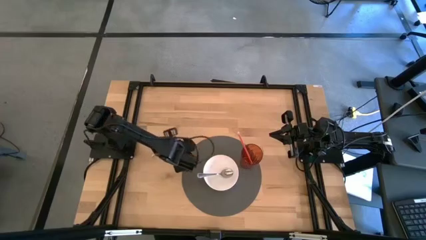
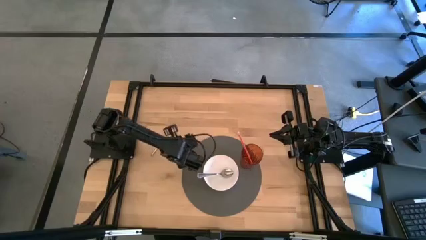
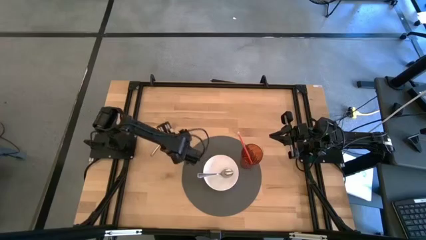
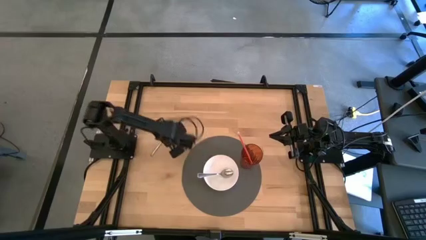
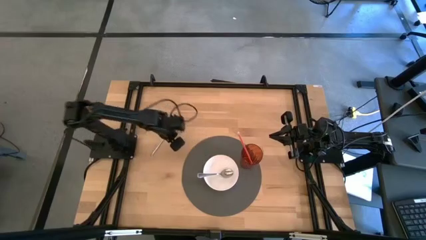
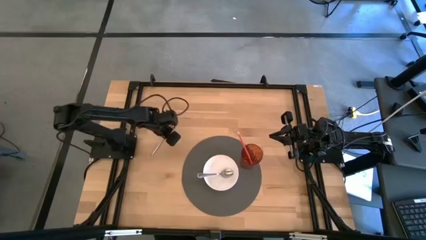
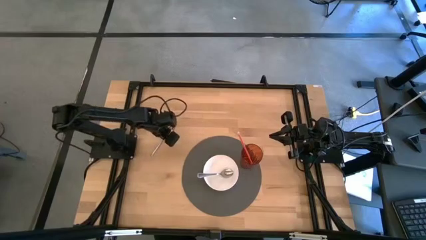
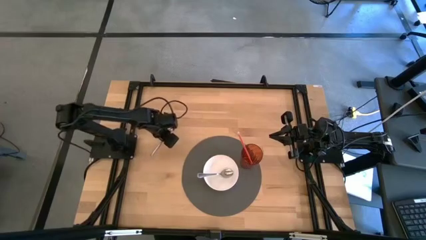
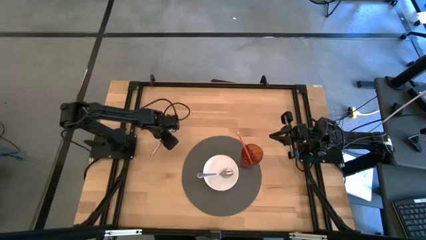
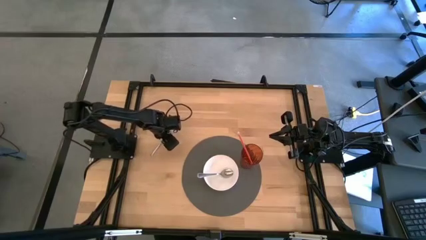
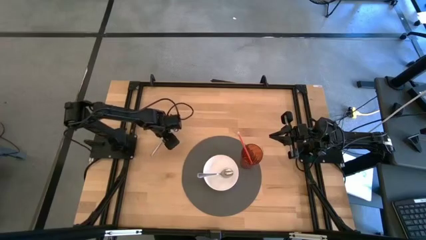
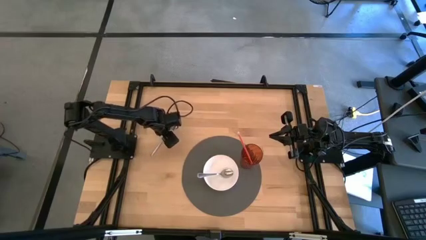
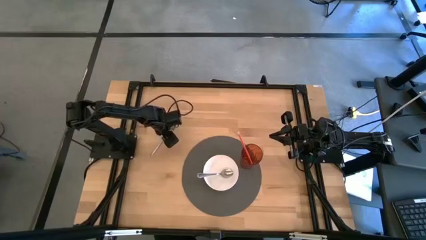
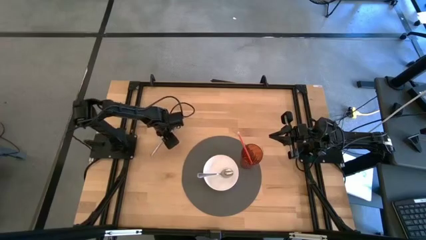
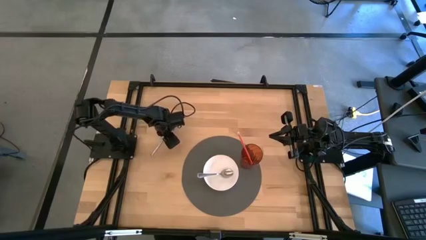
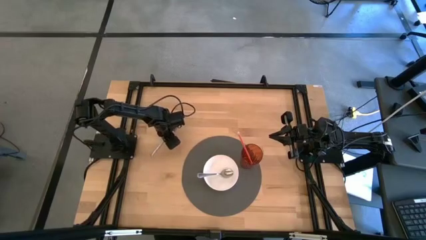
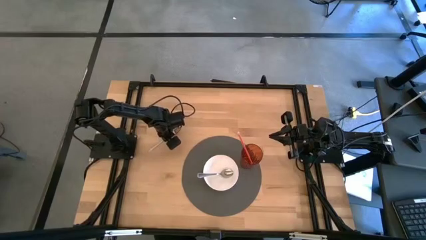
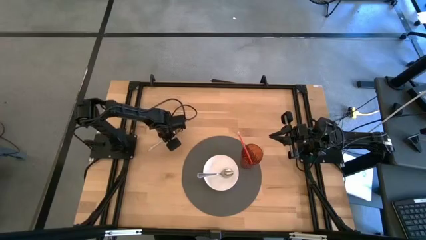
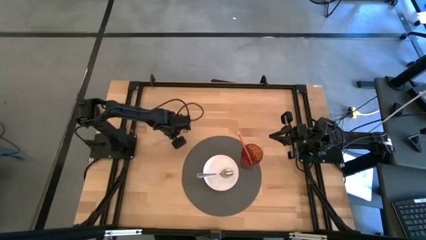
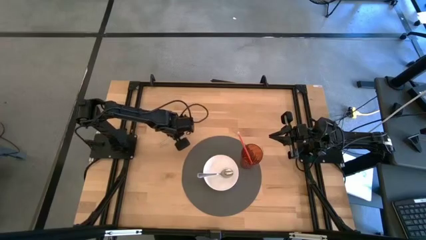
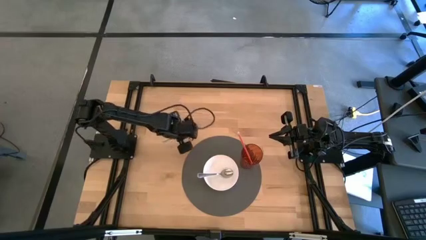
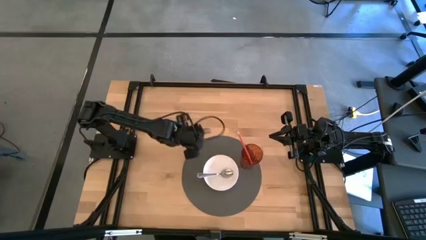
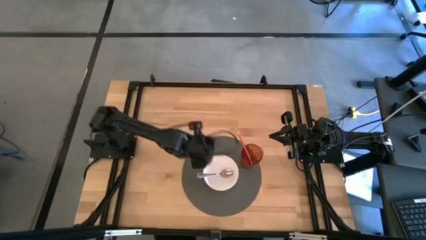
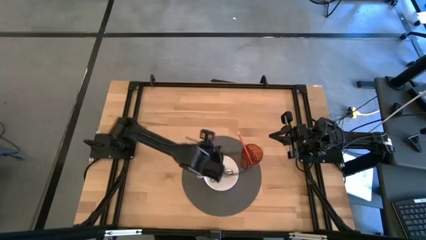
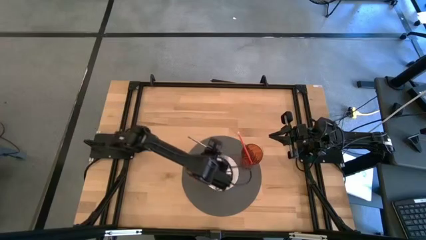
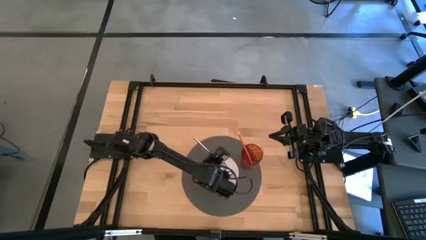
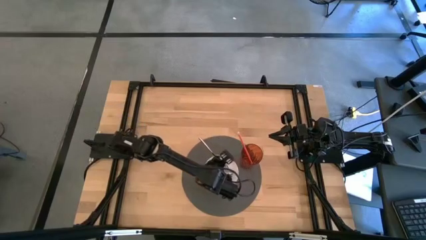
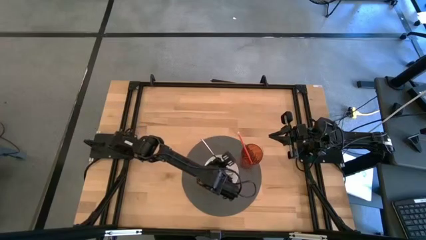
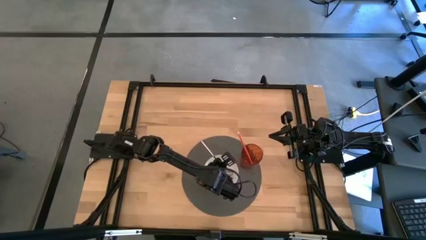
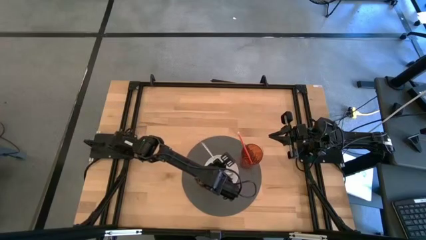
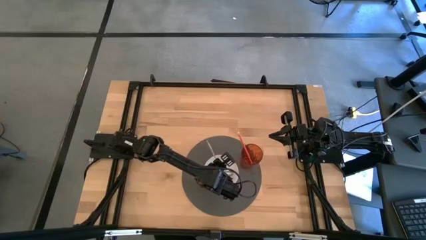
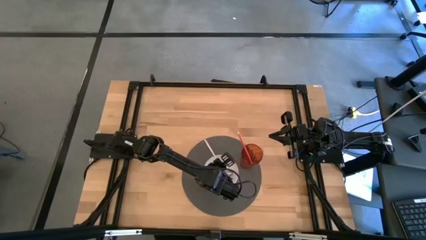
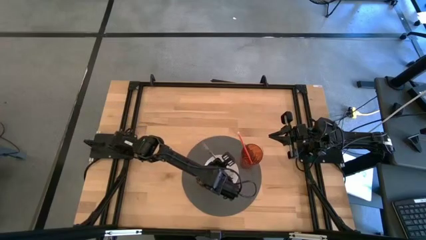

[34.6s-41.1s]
Task: Pick & Place Utensil
Put the silver fork into the white bowl

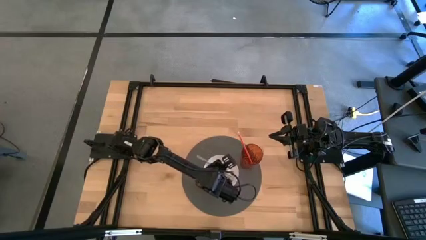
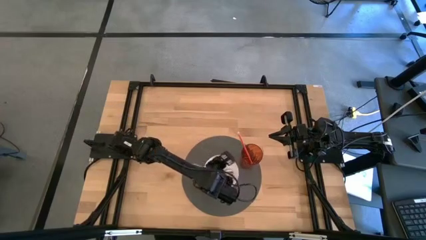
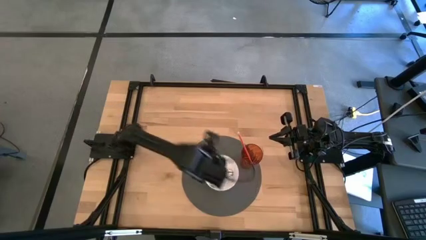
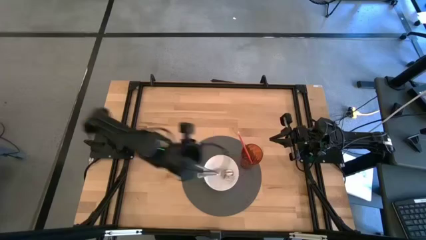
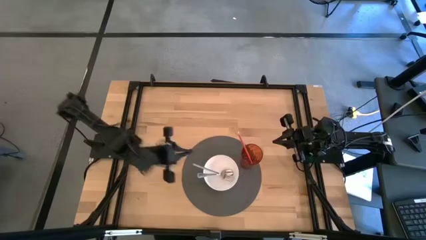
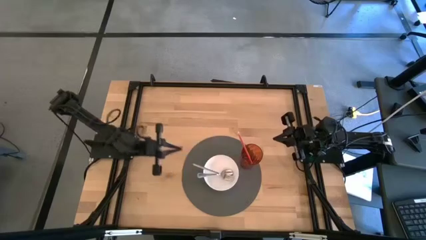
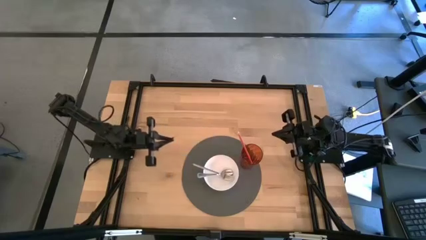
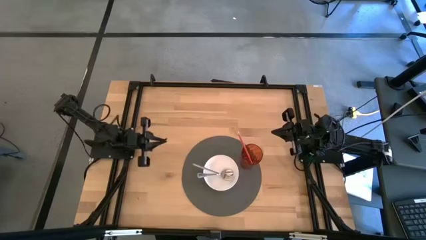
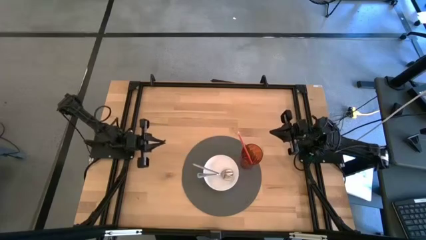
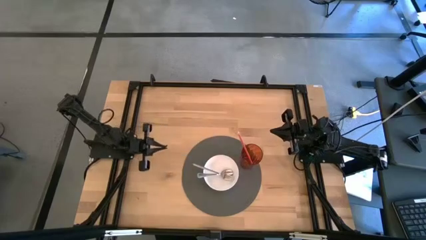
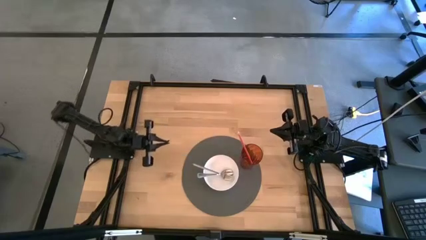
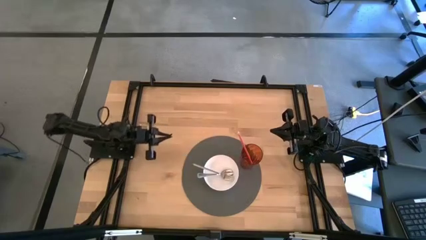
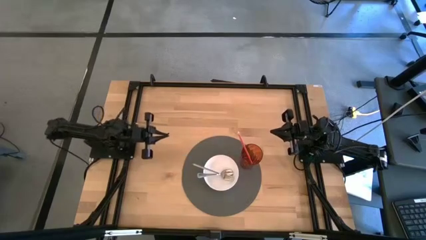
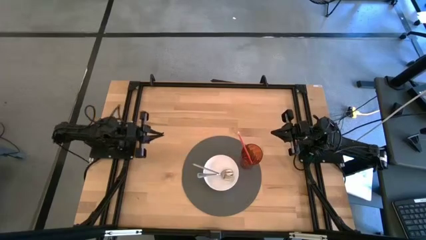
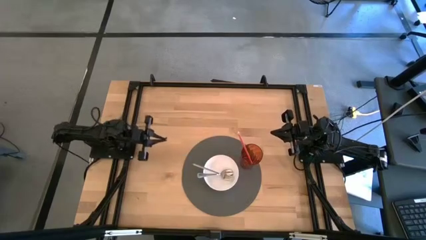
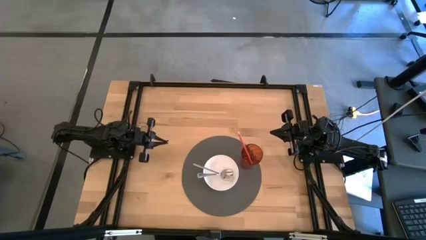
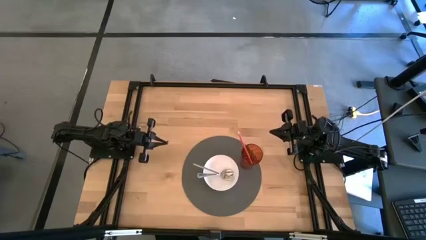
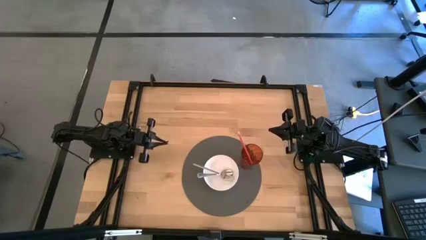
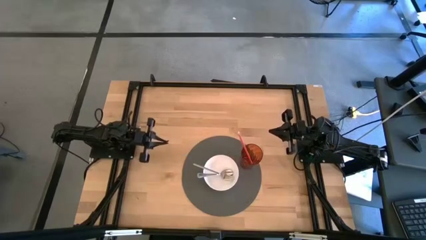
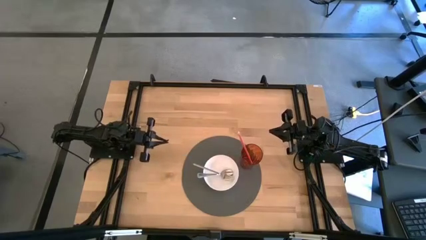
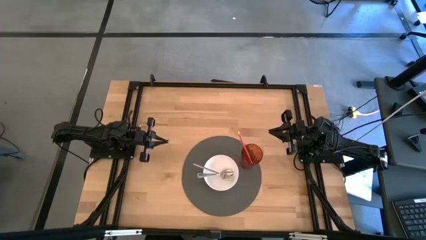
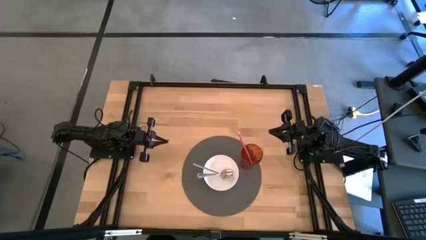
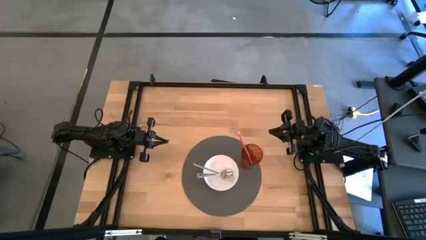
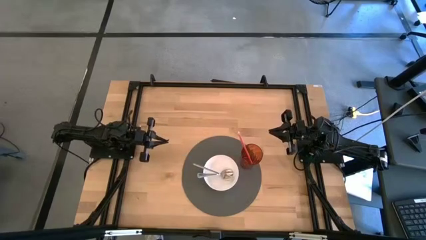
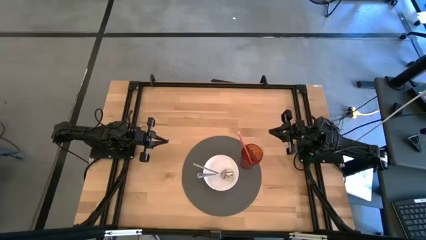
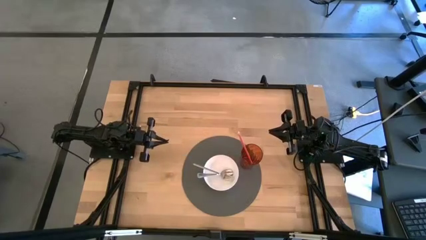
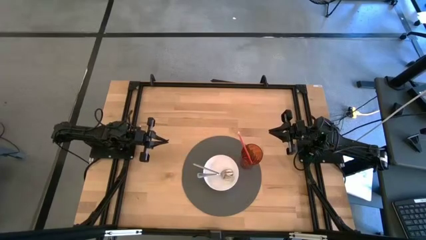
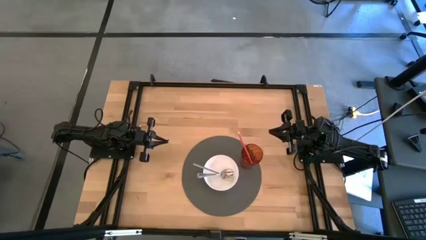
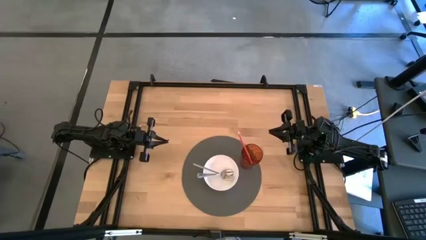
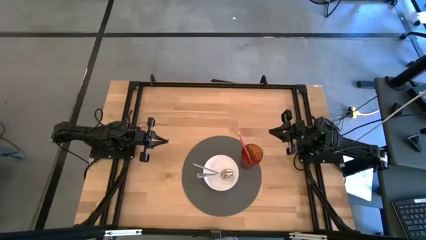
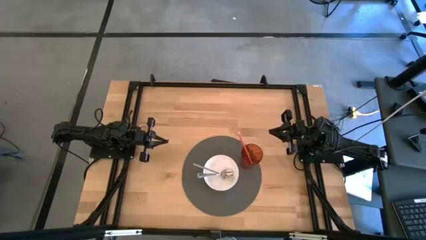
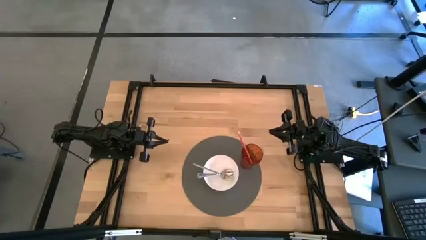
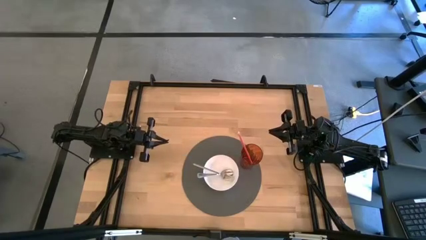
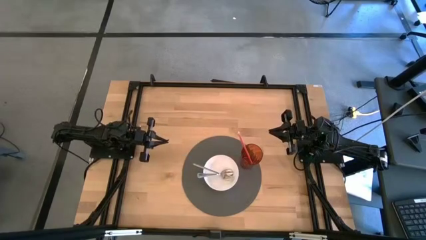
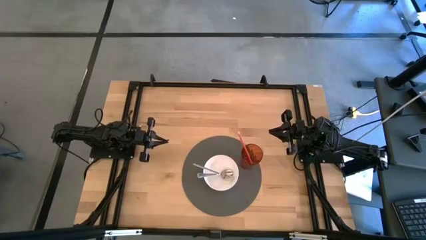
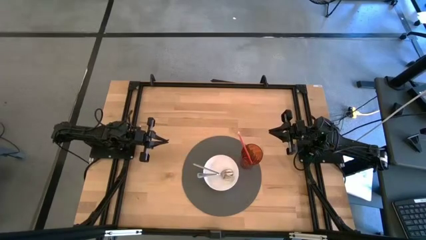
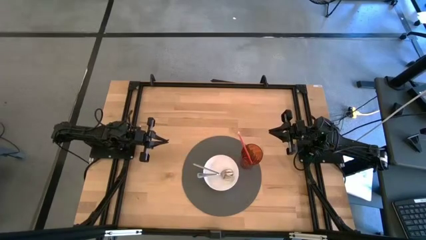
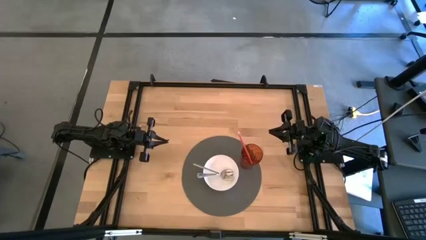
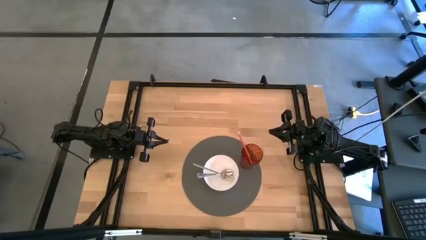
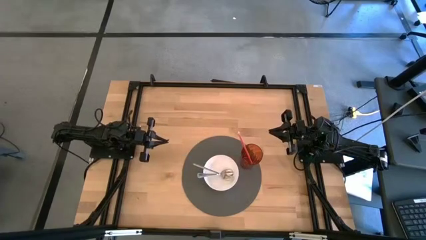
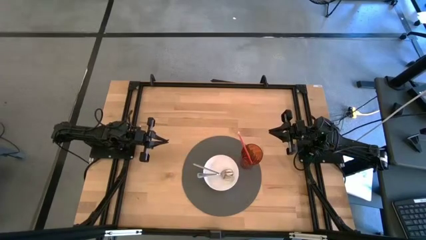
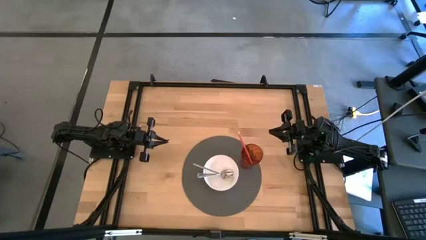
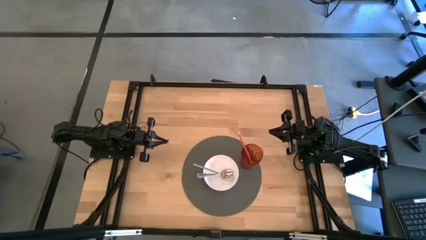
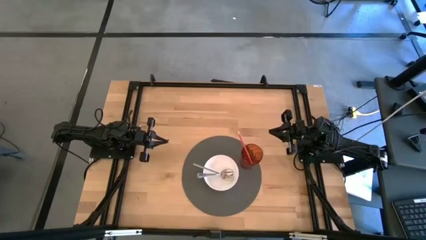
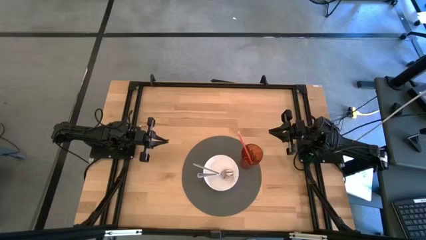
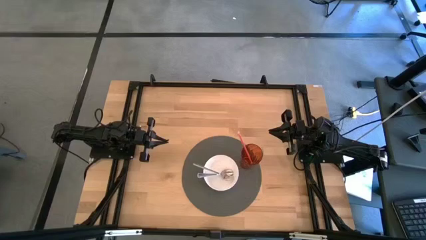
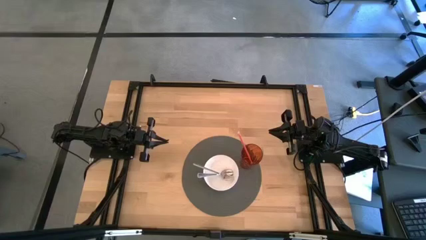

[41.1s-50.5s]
Return to Home Position
